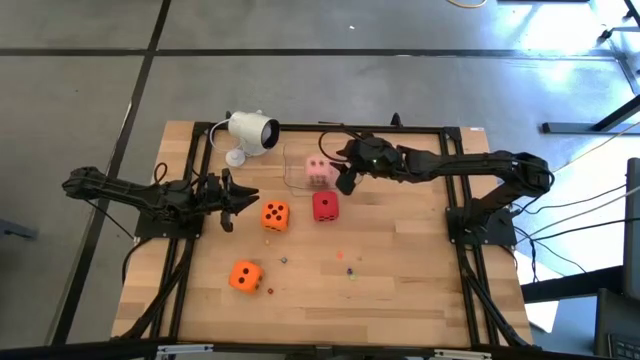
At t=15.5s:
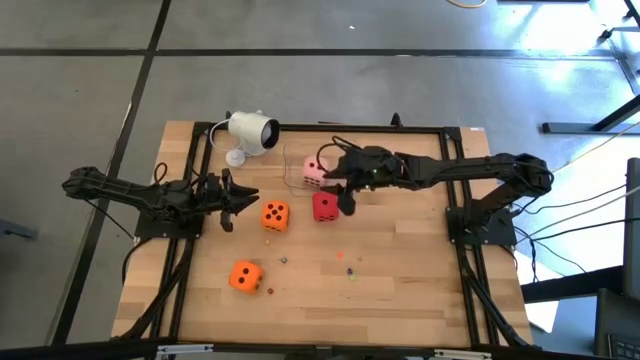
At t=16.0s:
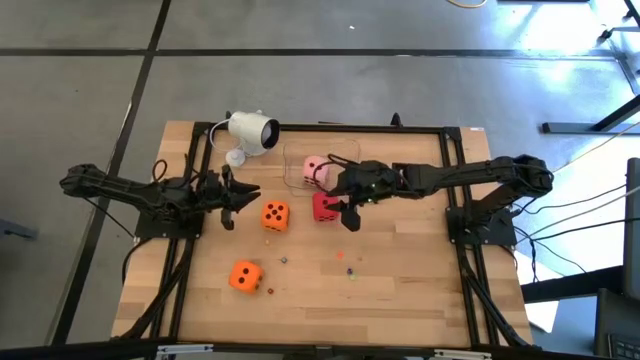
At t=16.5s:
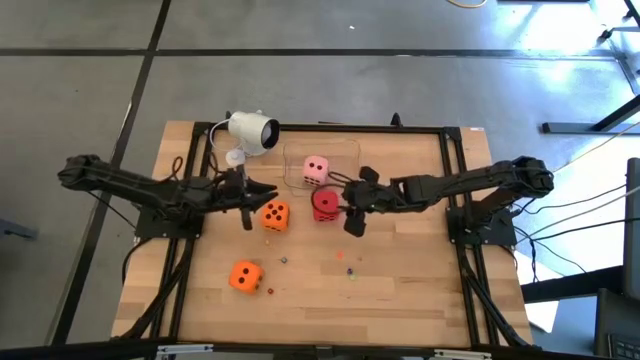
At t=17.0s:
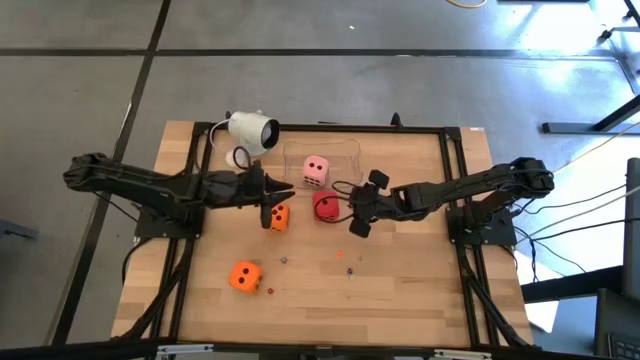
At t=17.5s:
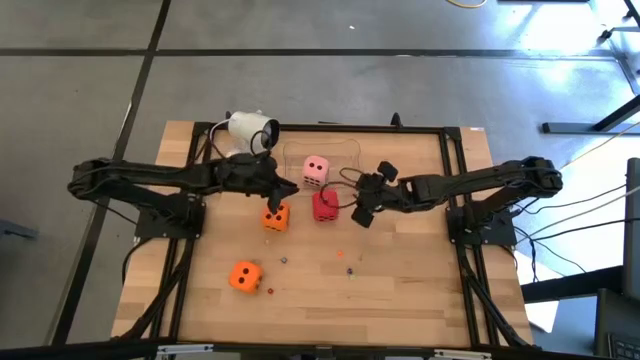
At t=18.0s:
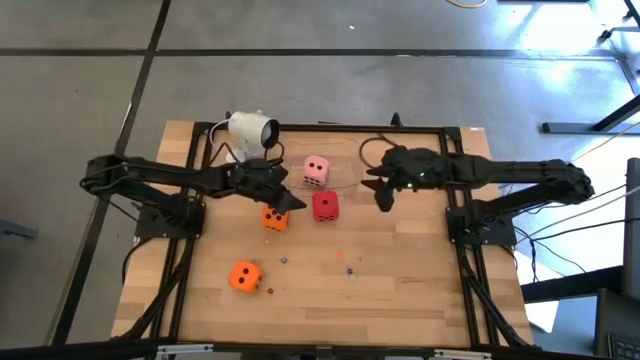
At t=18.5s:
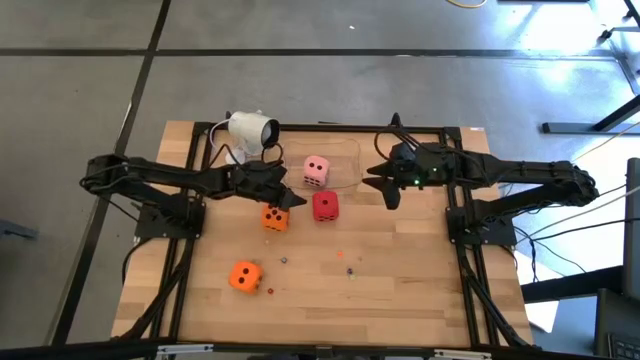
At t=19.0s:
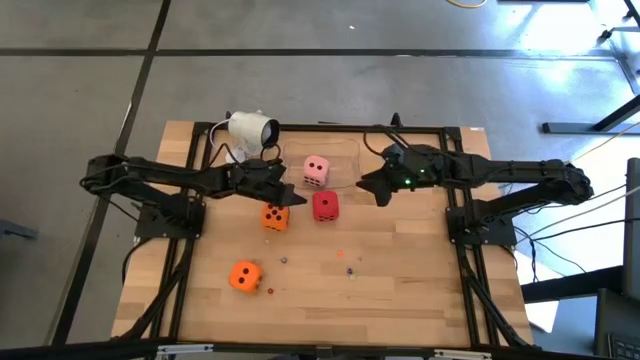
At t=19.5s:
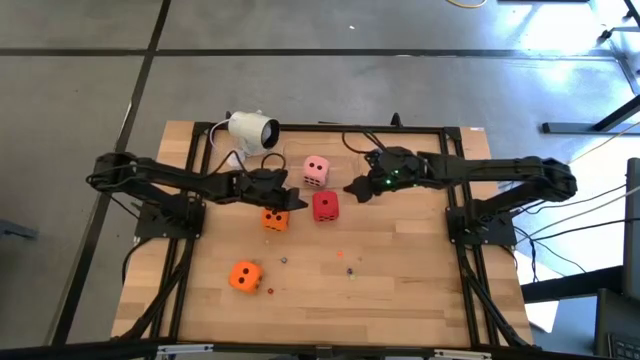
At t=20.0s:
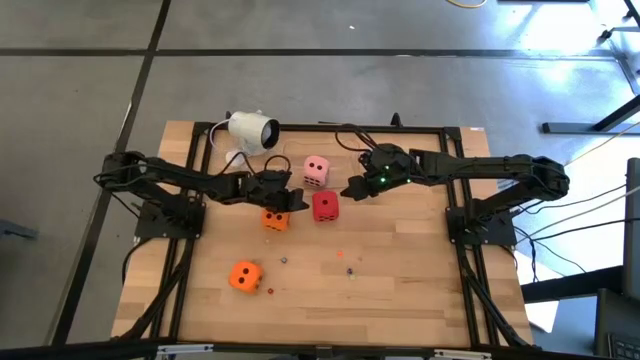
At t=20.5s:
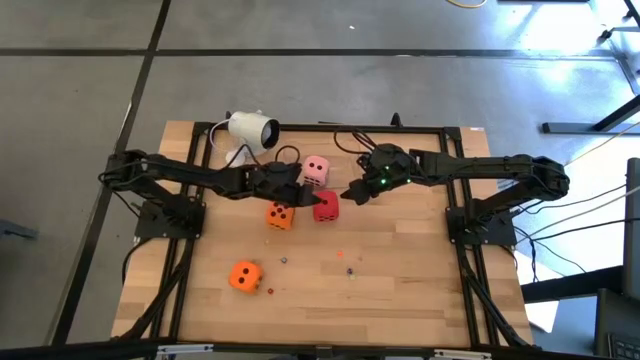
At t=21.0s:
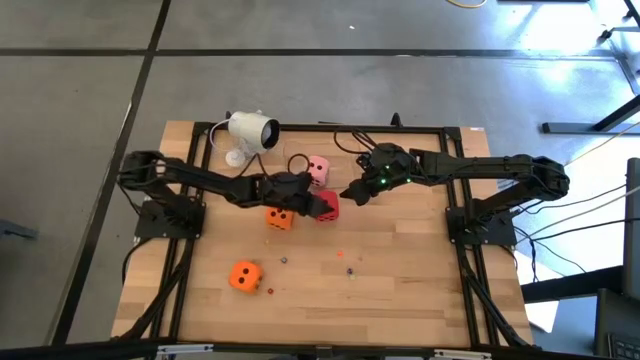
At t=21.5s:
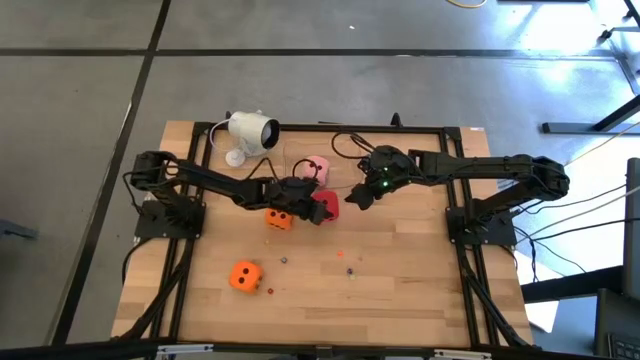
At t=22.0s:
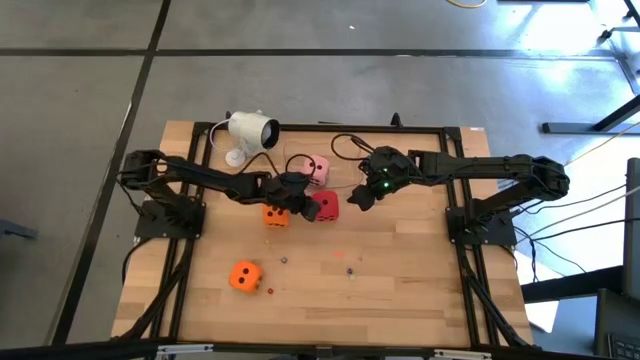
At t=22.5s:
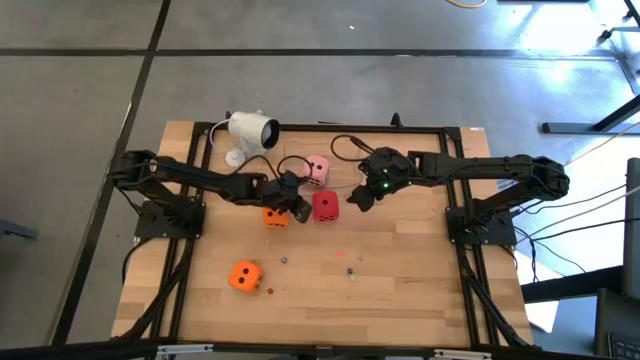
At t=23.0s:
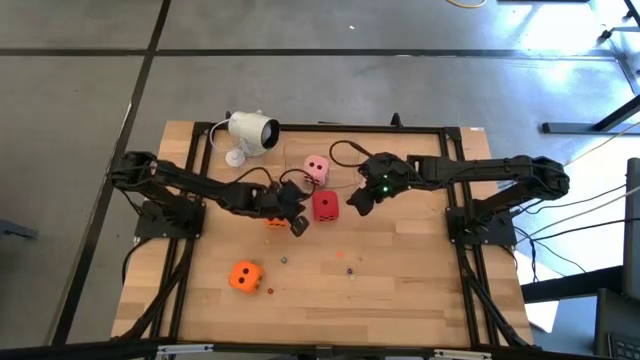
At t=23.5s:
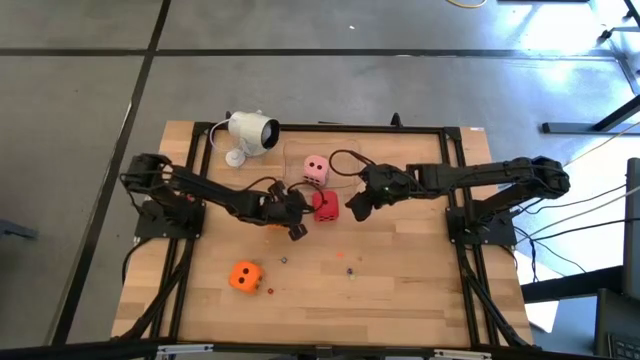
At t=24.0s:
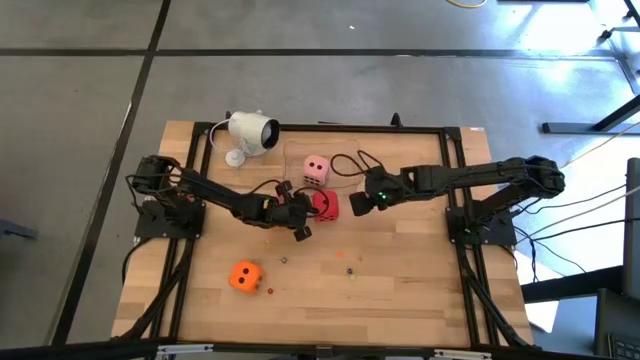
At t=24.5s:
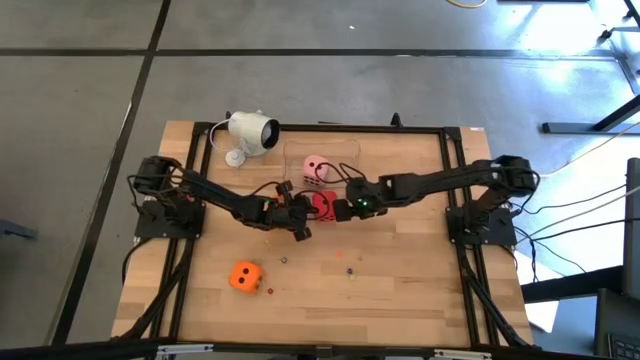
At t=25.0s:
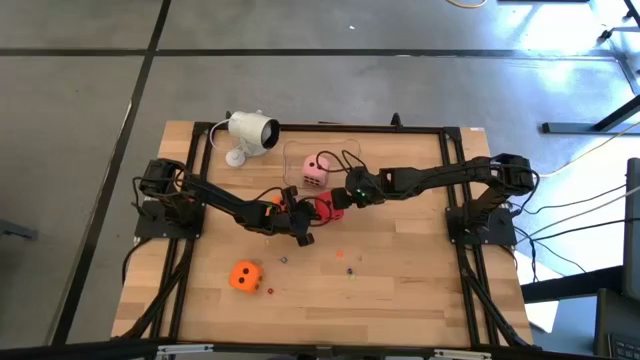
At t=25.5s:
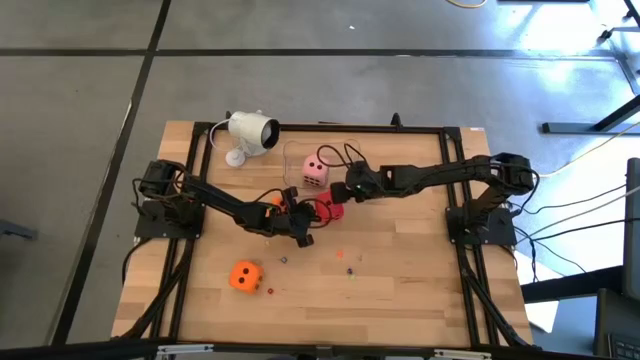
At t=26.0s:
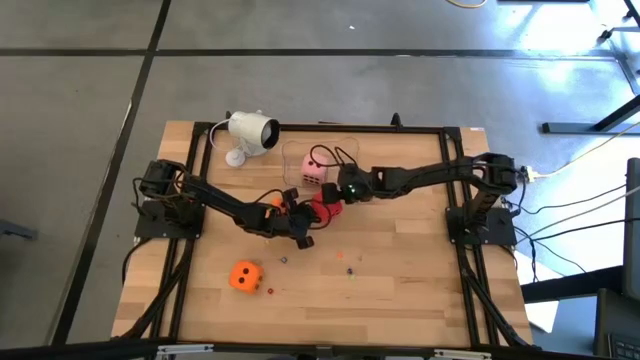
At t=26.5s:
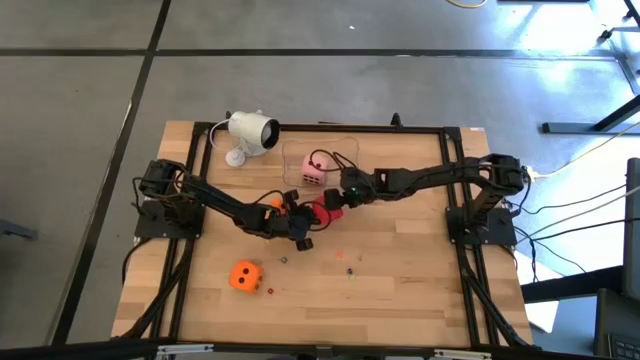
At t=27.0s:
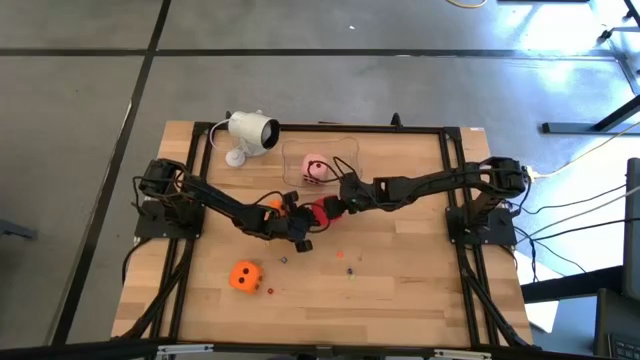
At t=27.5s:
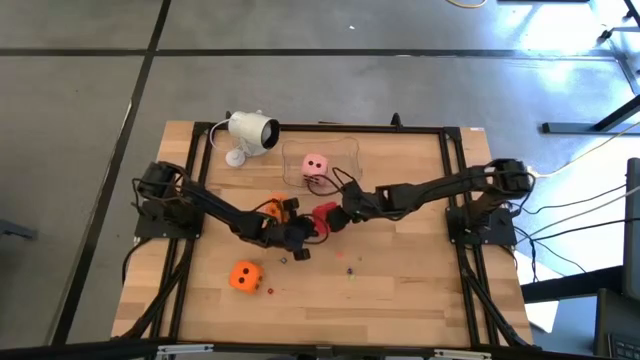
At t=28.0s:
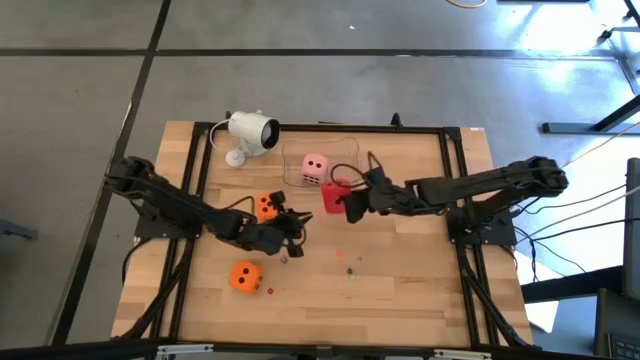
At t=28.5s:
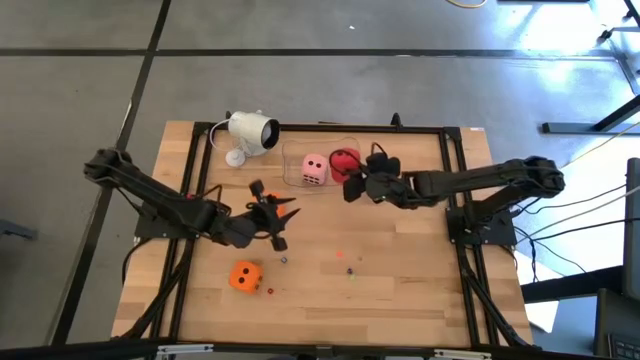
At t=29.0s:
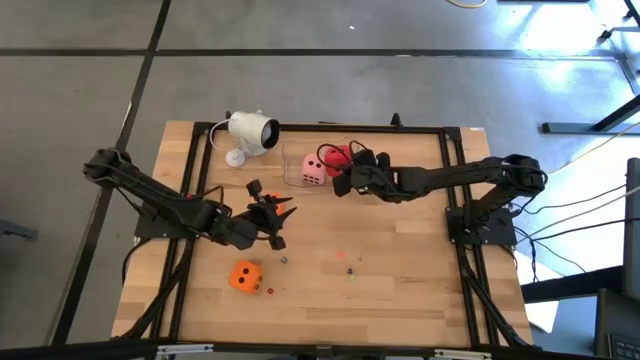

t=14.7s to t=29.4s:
Task: Pick & Place Dice
Put the large red die into the transparent bin

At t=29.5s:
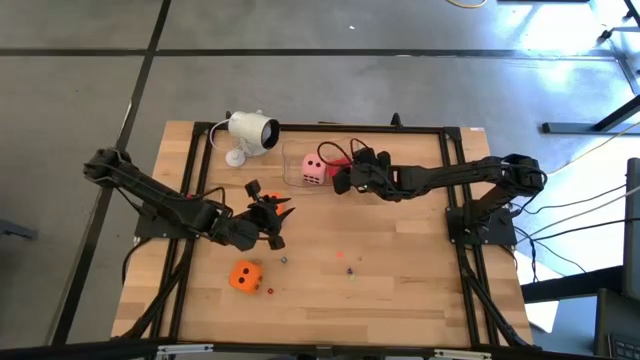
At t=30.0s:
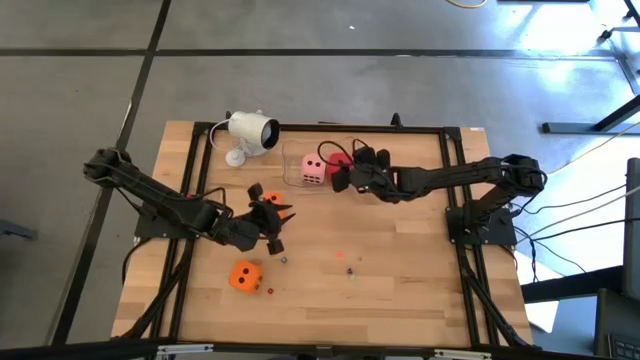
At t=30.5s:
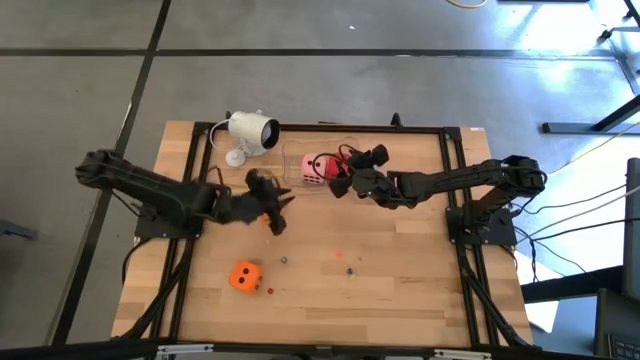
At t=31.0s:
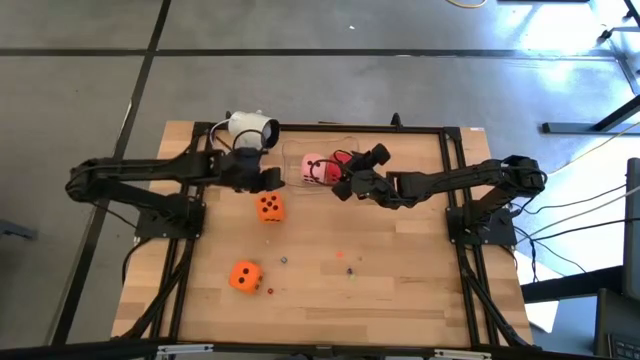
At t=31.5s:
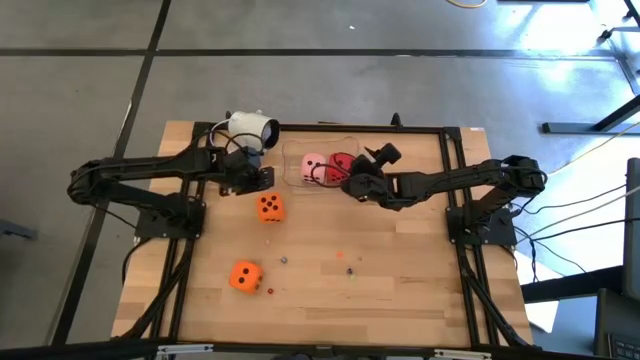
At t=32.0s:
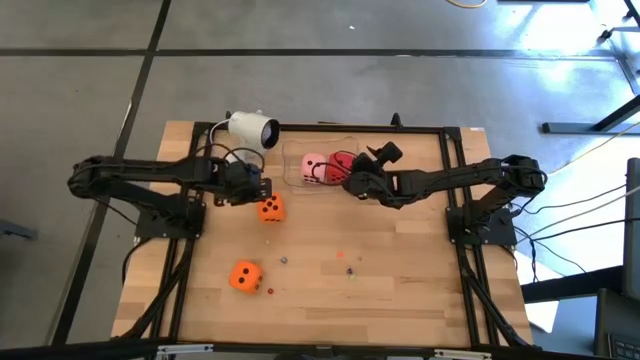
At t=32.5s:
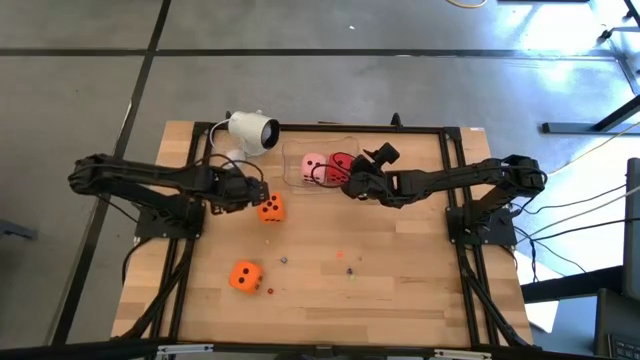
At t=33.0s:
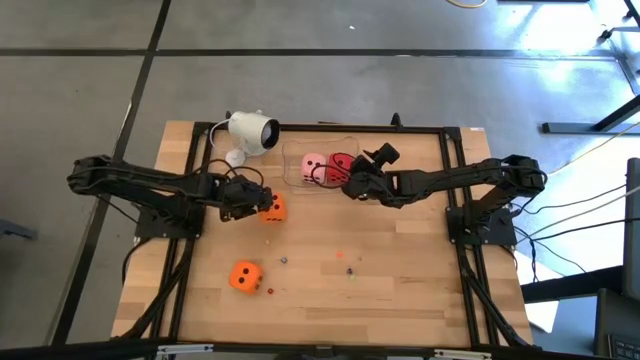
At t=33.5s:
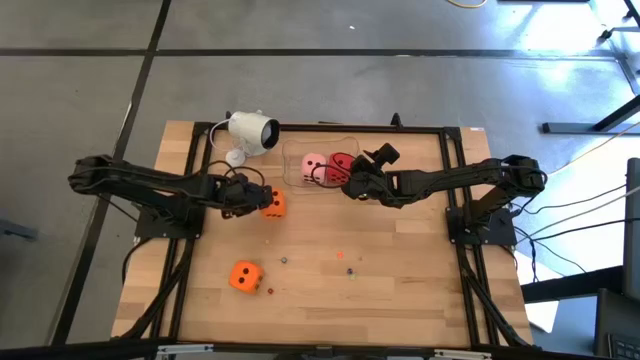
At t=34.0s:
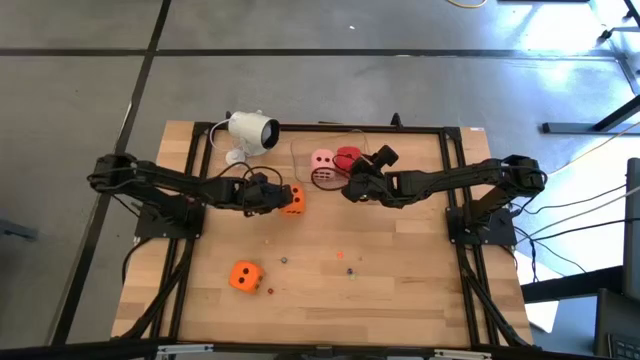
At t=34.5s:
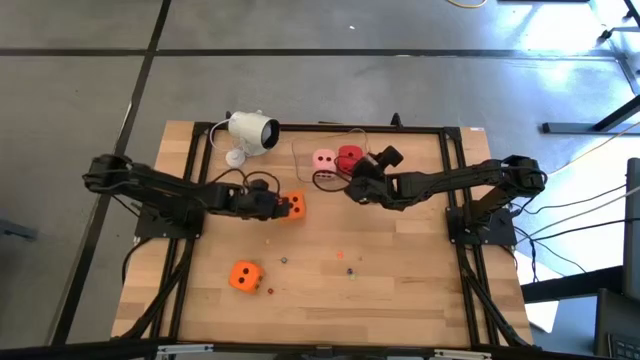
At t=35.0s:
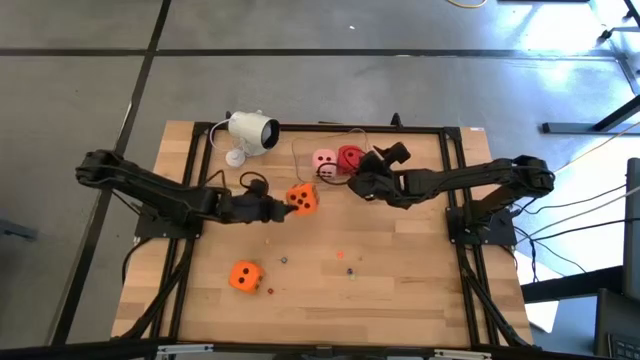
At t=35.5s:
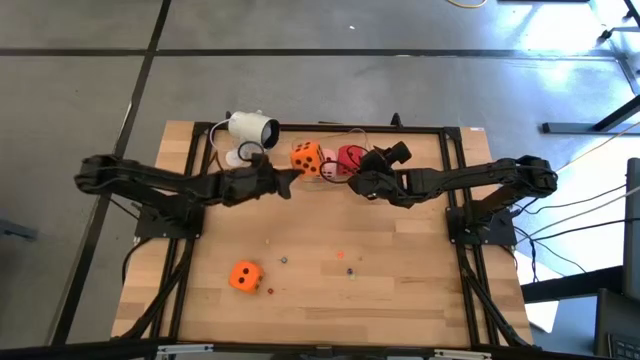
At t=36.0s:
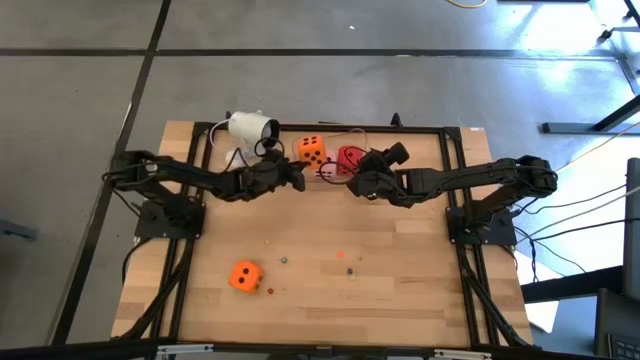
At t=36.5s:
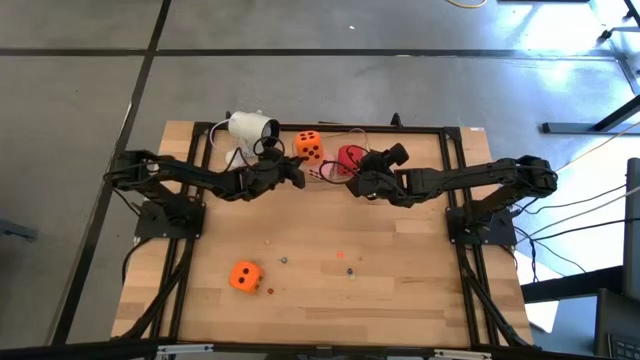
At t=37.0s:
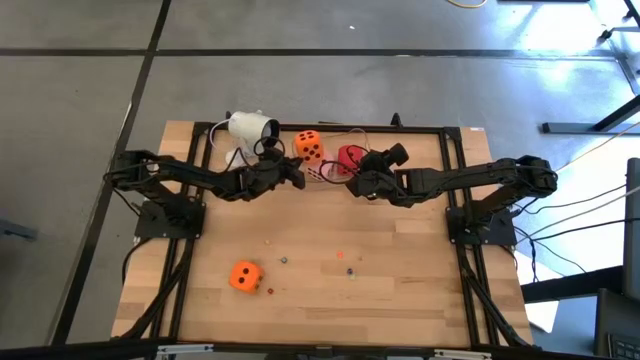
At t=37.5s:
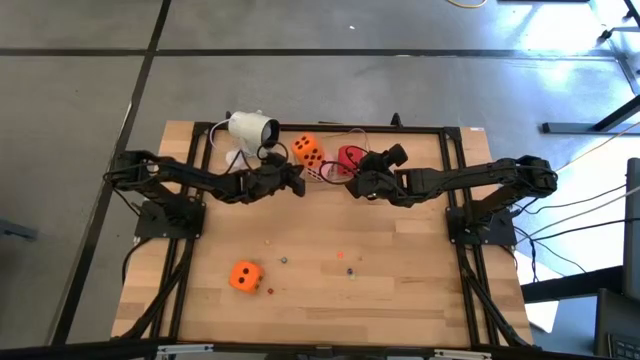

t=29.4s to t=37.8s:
Put the top large orange die into the transparent bin
